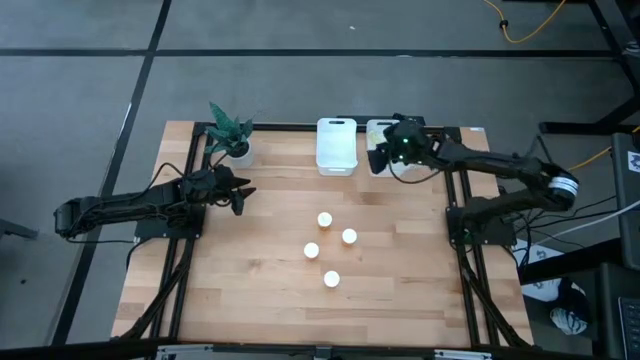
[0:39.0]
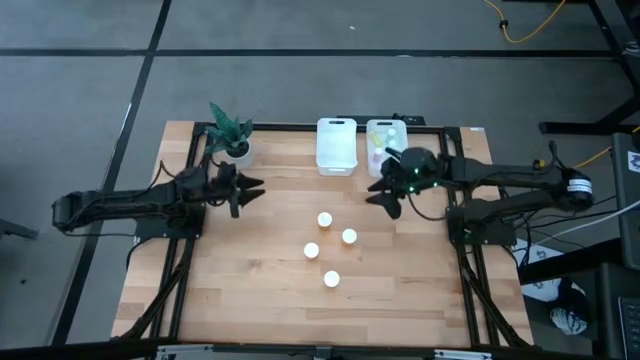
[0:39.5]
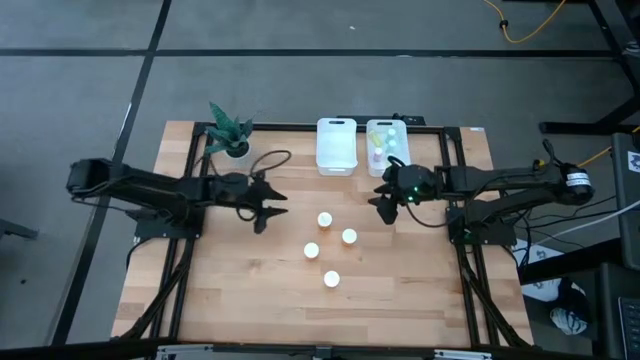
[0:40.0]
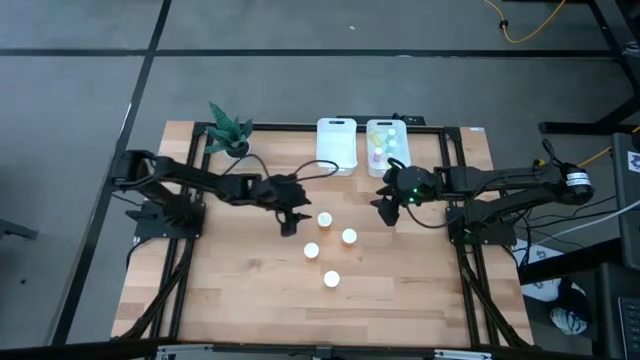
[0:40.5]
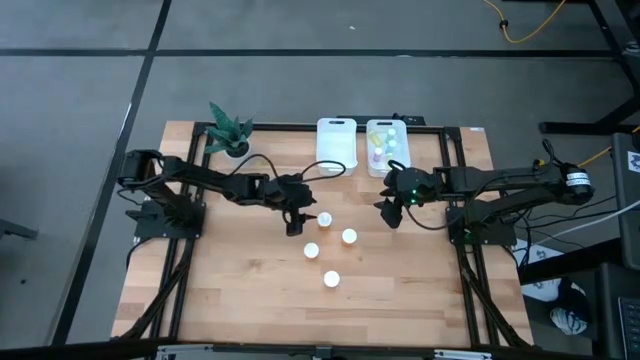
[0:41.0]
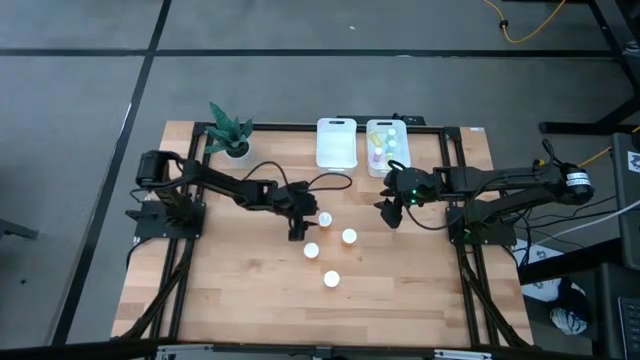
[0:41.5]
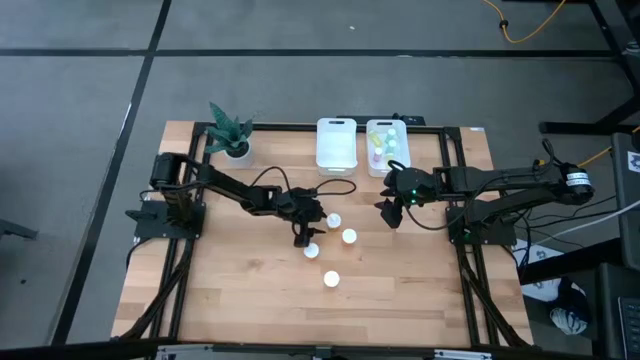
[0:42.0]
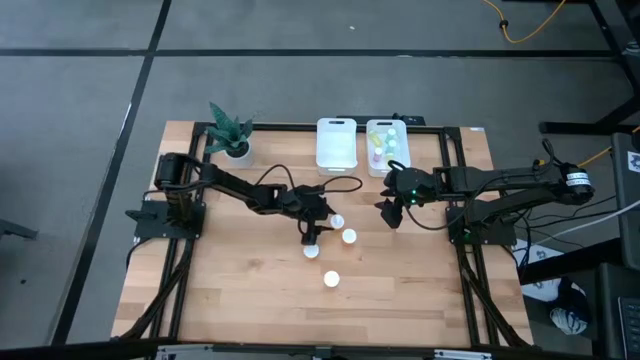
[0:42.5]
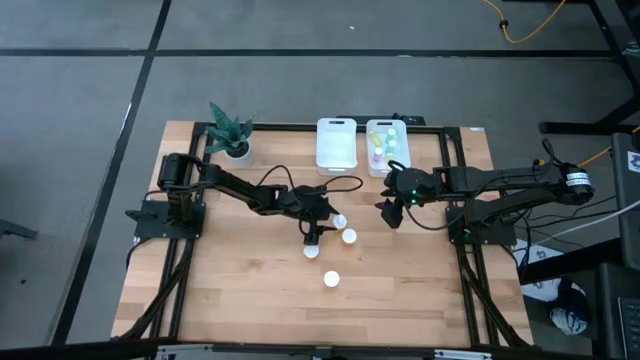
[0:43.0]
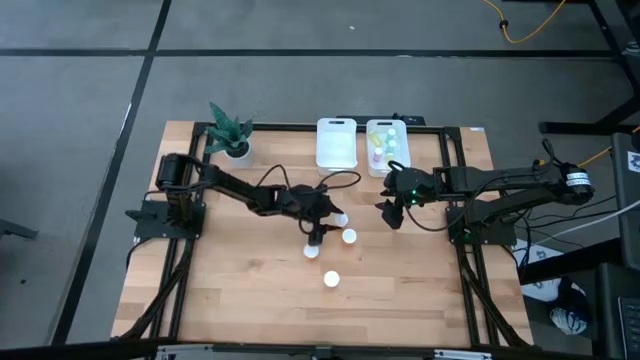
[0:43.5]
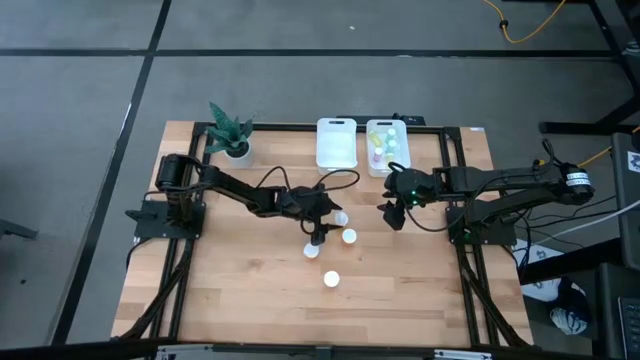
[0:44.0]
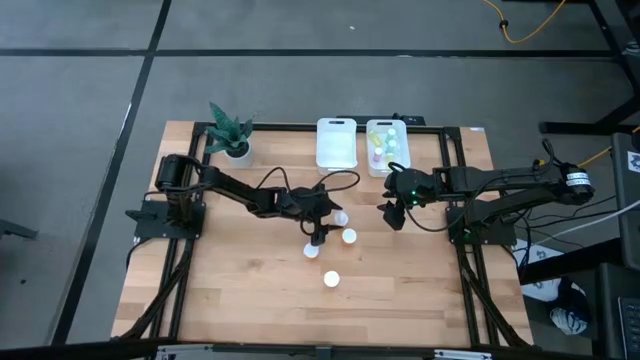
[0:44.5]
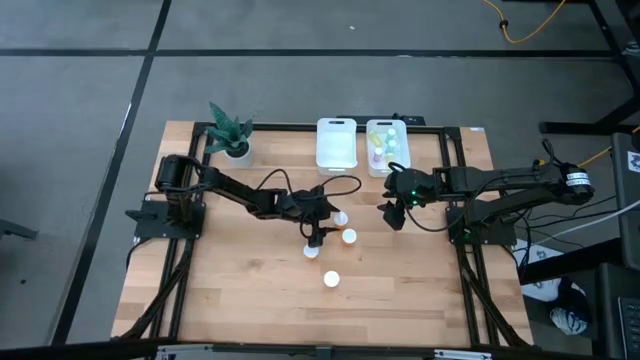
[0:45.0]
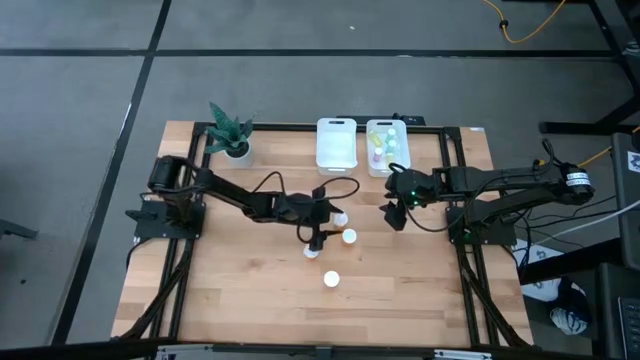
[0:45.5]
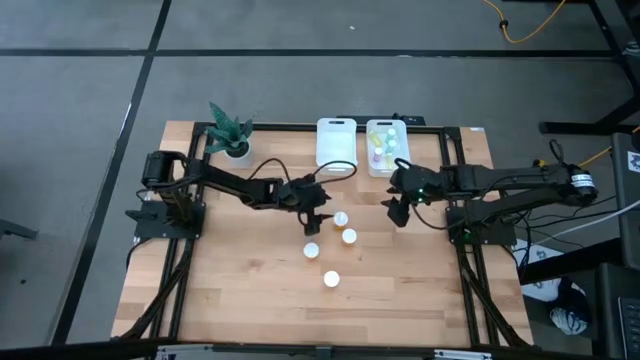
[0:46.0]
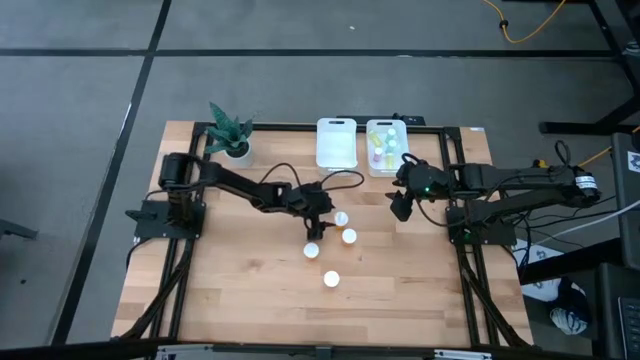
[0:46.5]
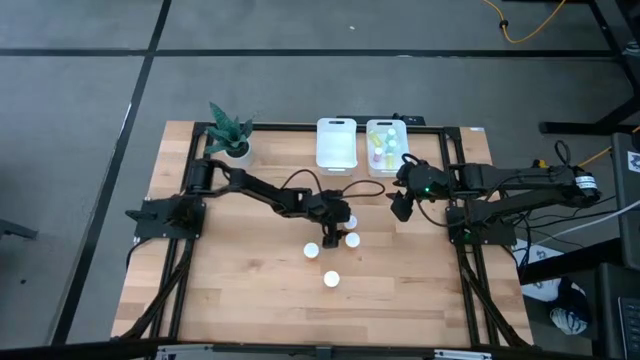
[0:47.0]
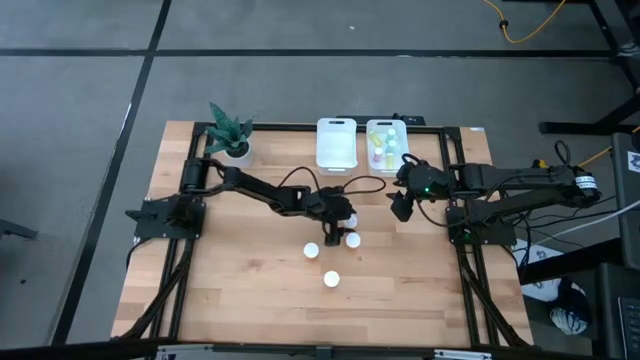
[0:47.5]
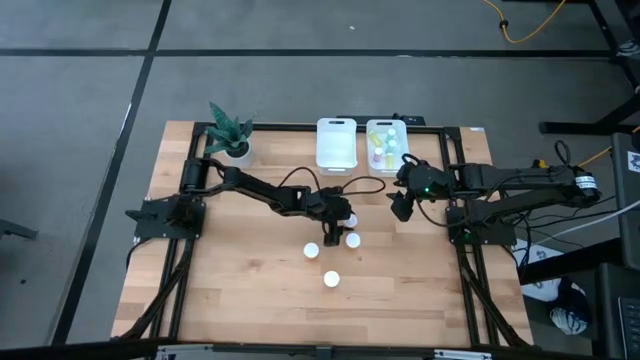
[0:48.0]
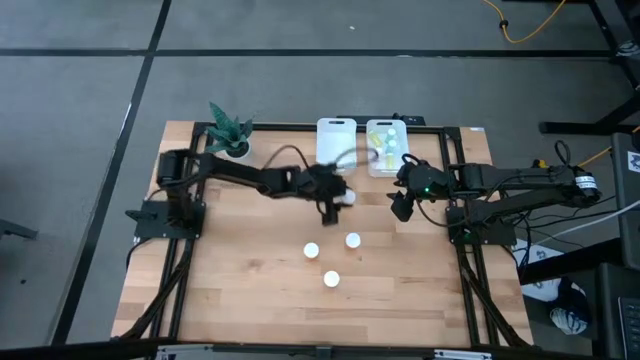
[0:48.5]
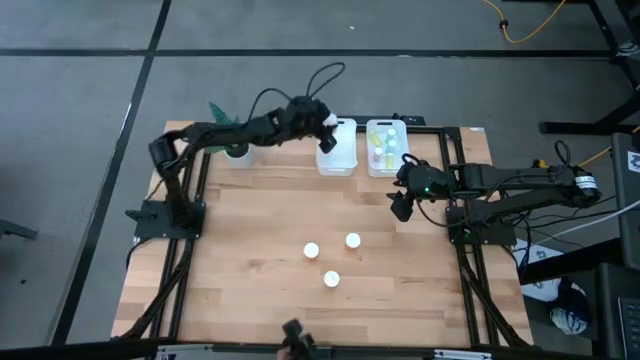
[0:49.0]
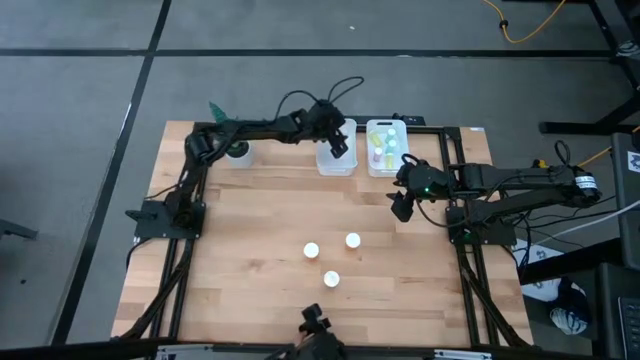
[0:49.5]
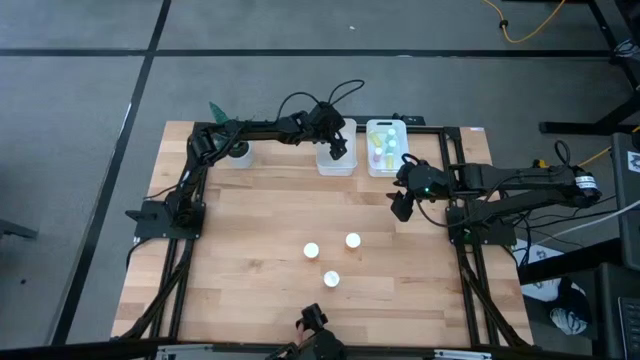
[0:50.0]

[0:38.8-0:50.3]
Task: Pick and place medicine bottles into bin by pill shape (circle, oval)
Put the large orange pill bottle into the left white bin

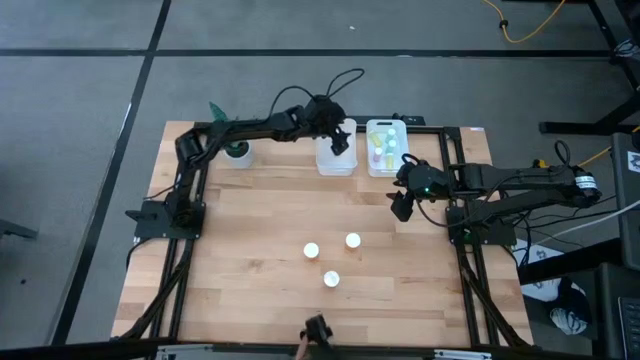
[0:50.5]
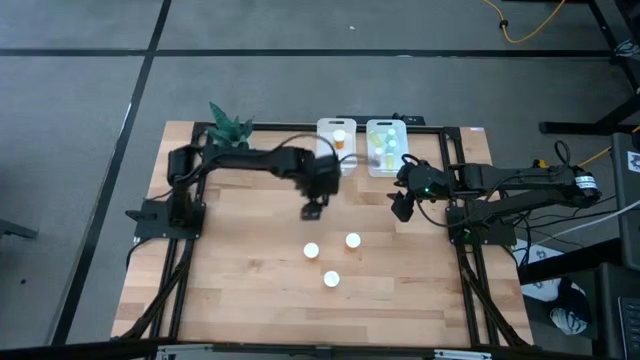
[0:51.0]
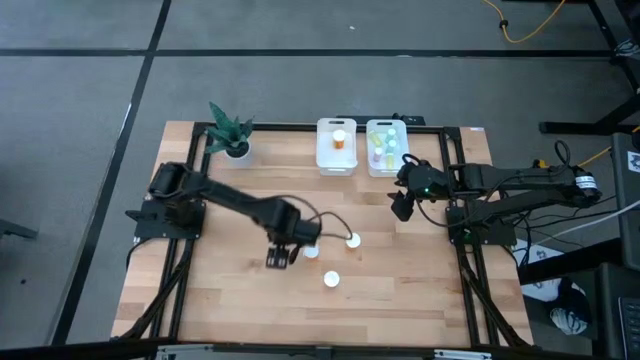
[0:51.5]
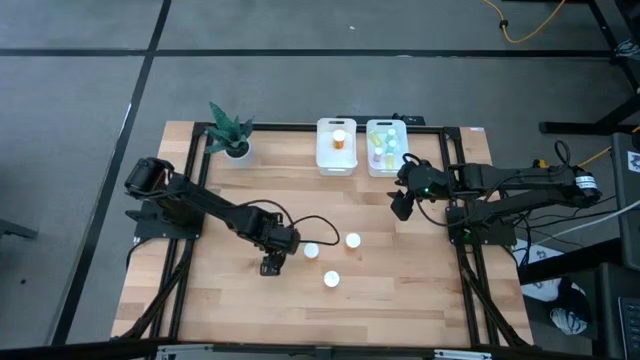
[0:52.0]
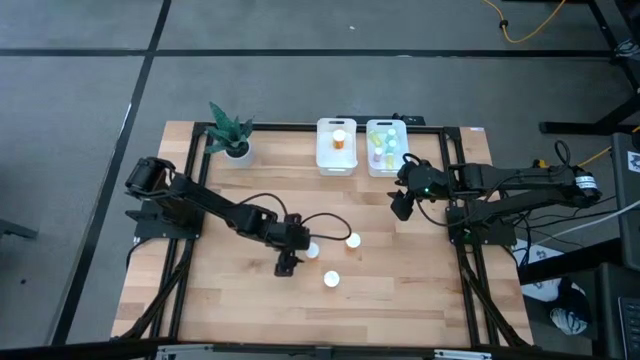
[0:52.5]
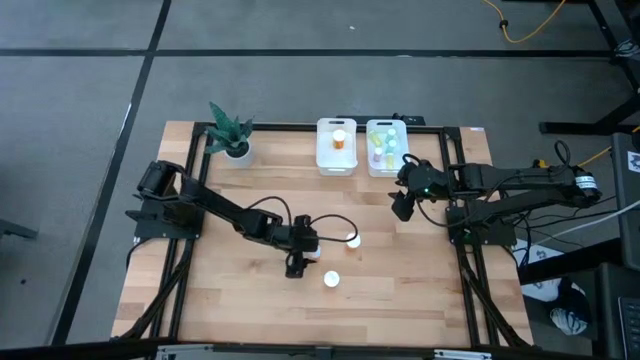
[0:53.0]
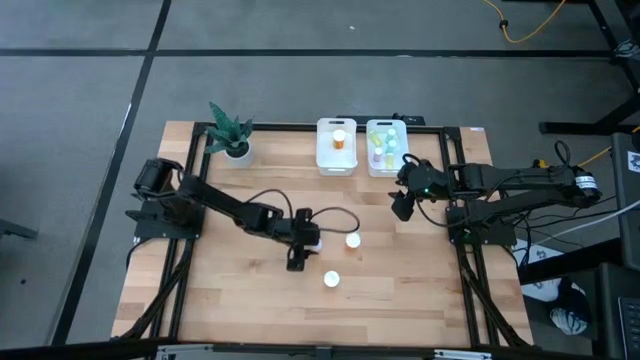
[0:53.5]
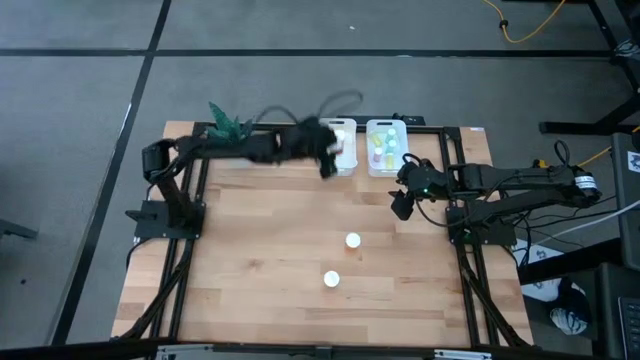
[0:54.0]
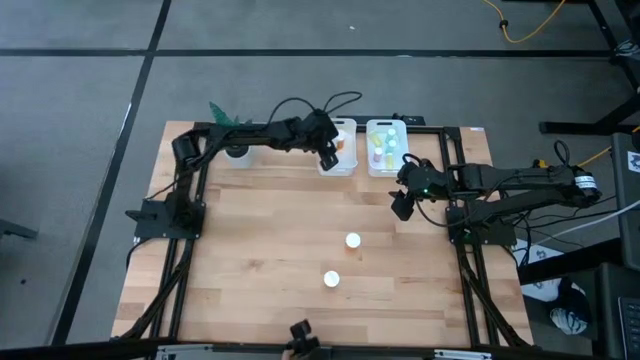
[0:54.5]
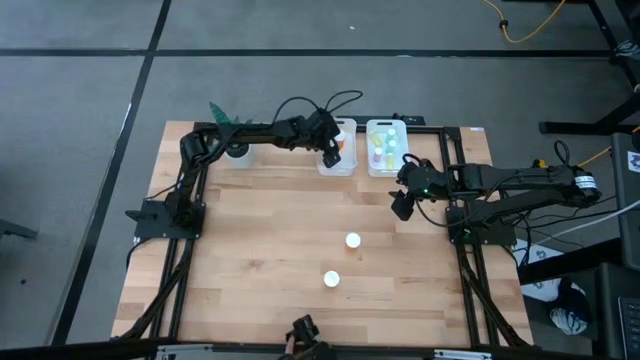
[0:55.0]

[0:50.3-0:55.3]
Put the large orange pill bottle into the left white bin

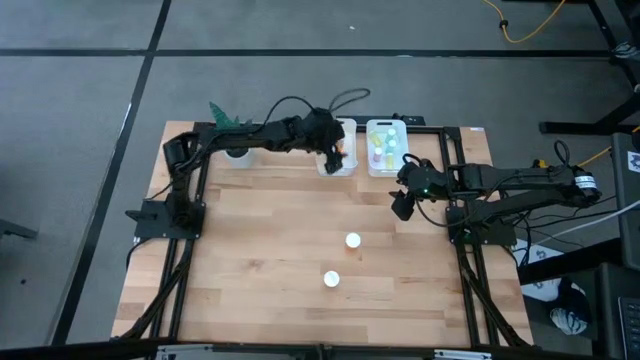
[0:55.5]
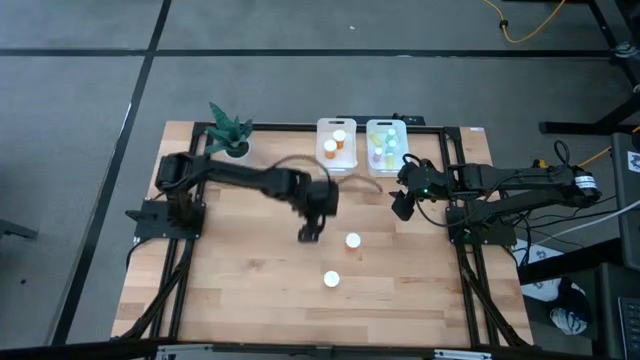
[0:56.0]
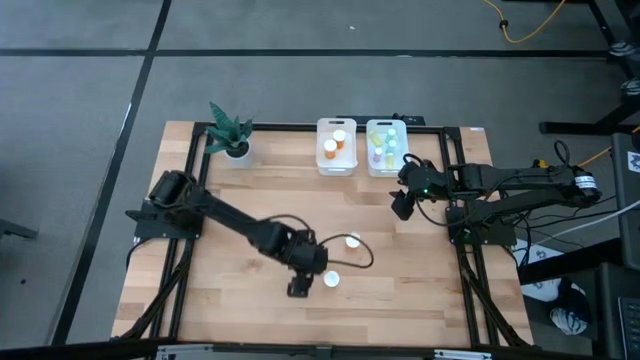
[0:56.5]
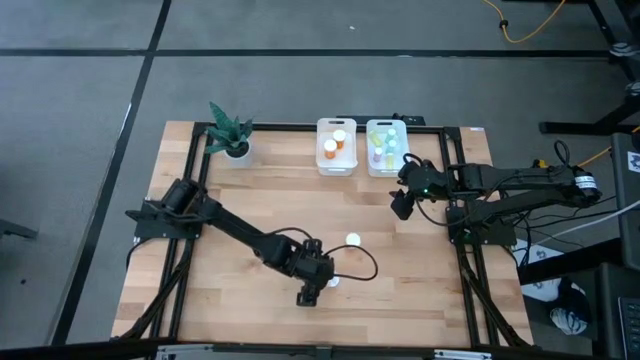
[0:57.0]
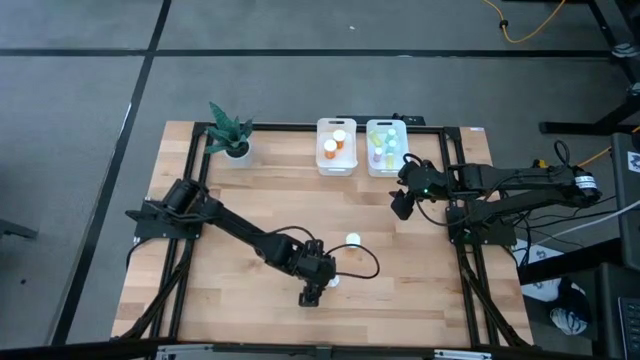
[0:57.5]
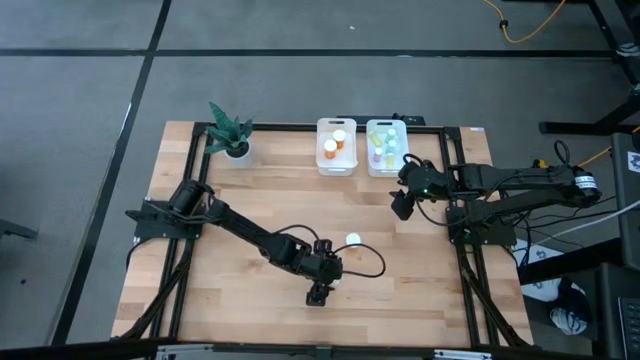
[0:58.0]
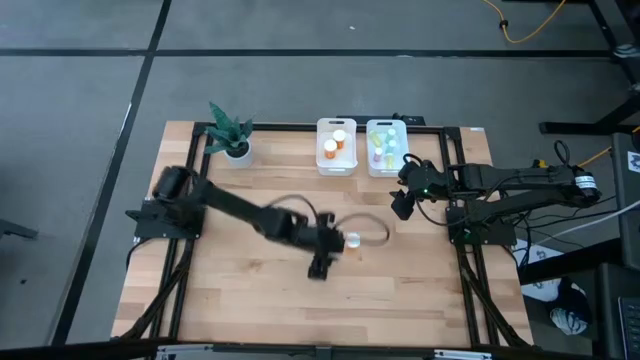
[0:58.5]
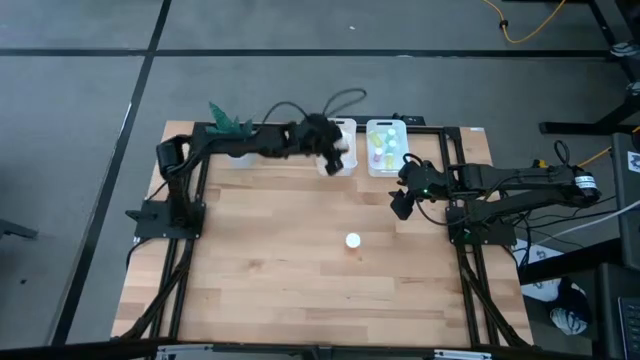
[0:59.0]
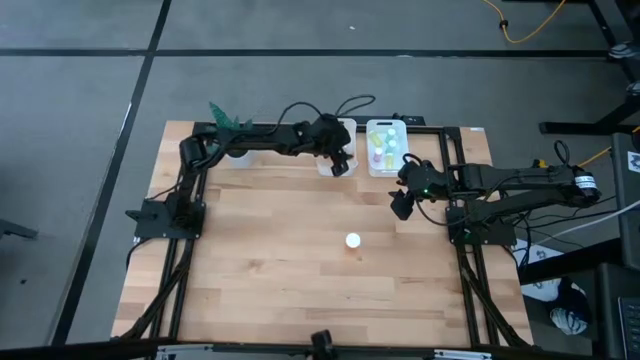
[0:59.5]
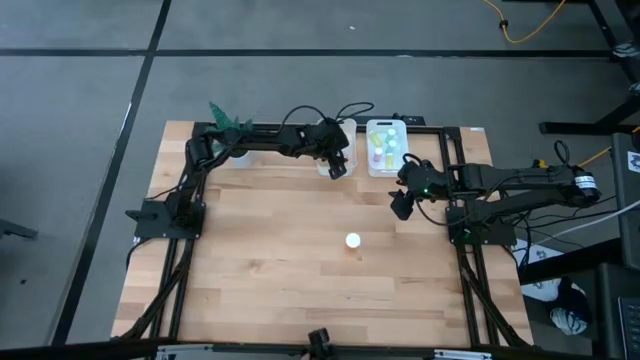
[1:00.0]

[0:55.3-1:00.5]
Put the large orange pill bottle into the left white bin
